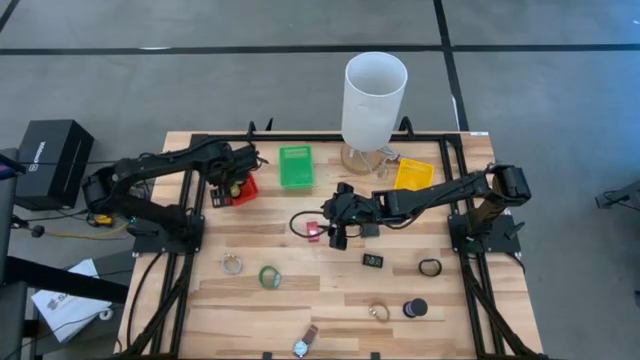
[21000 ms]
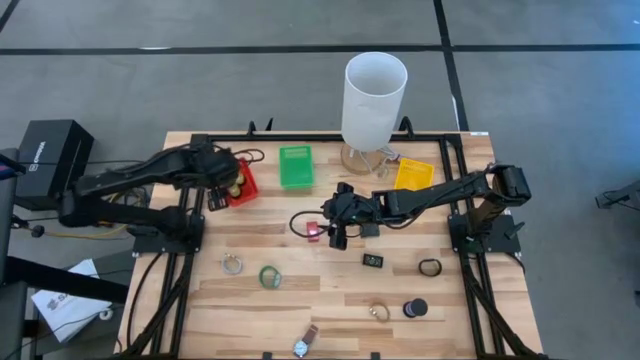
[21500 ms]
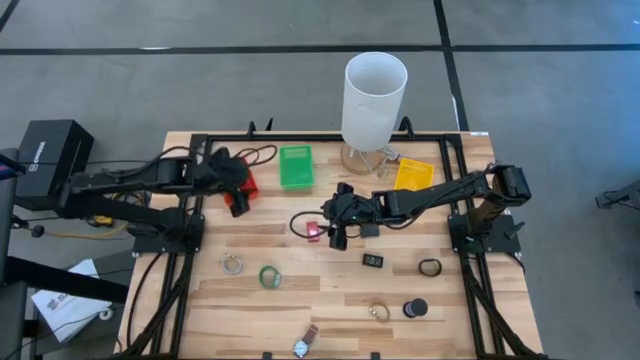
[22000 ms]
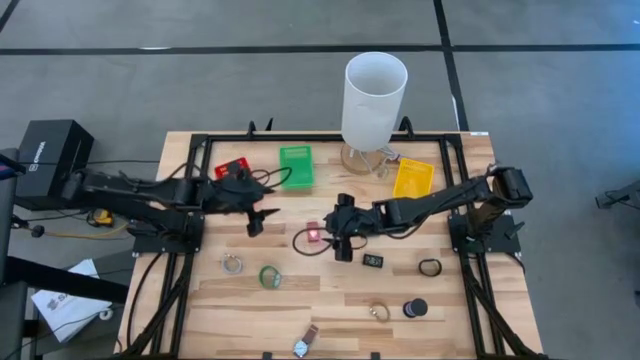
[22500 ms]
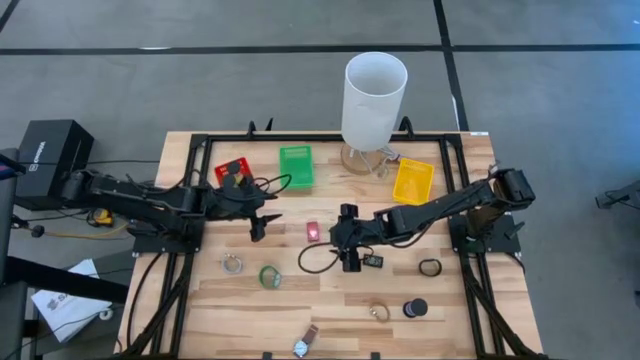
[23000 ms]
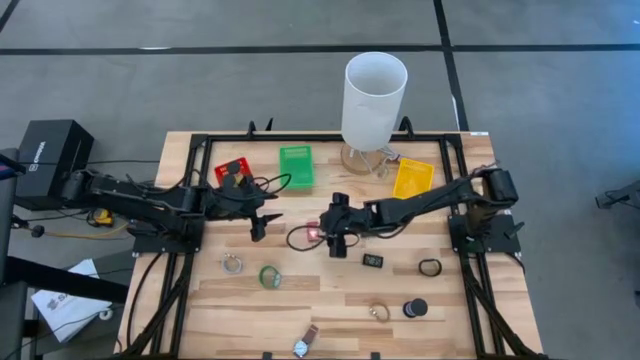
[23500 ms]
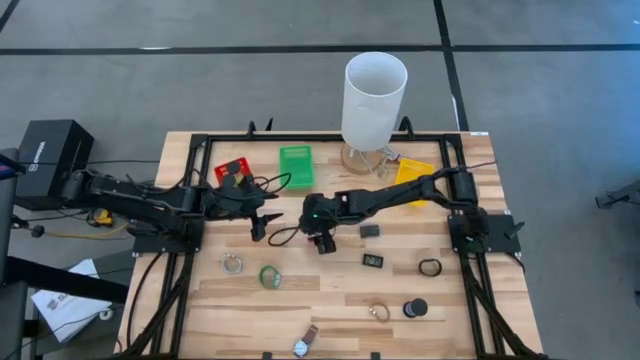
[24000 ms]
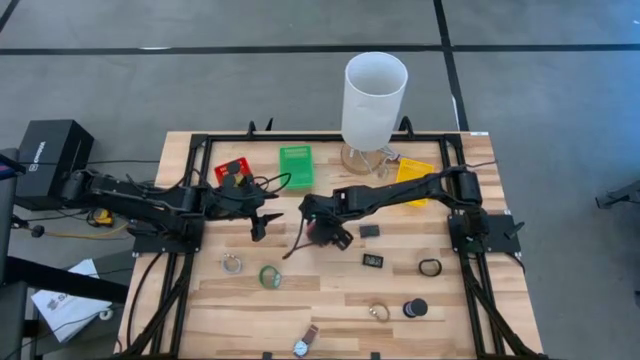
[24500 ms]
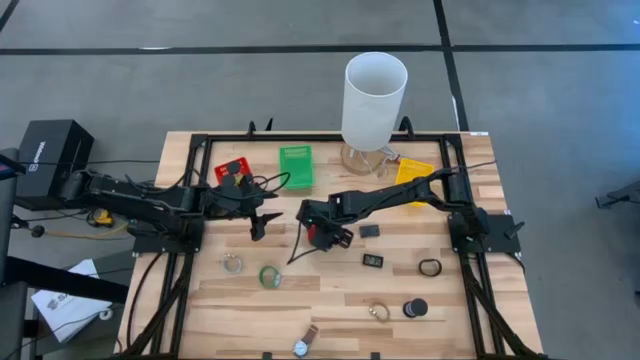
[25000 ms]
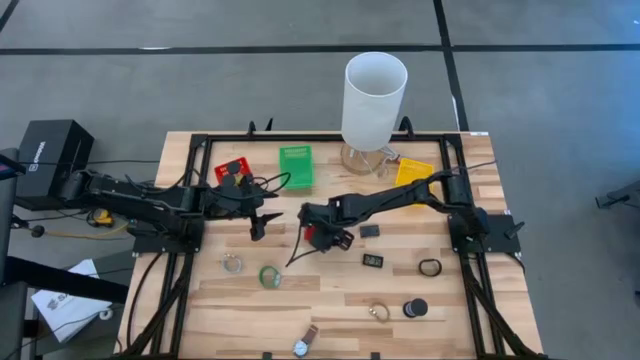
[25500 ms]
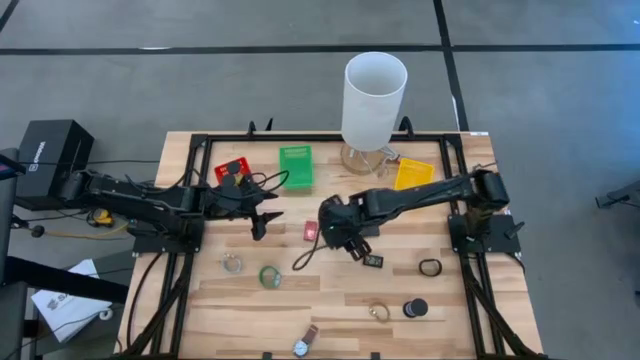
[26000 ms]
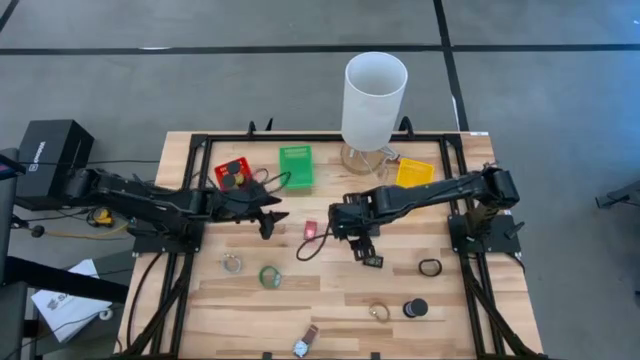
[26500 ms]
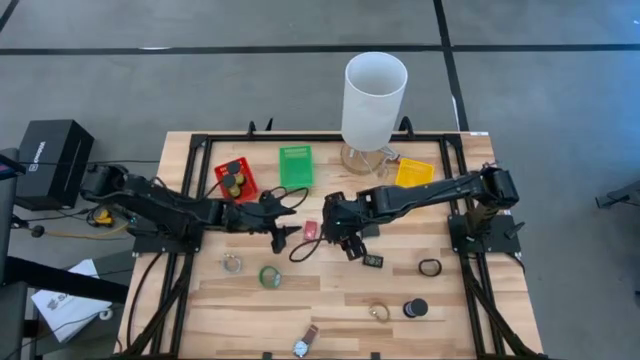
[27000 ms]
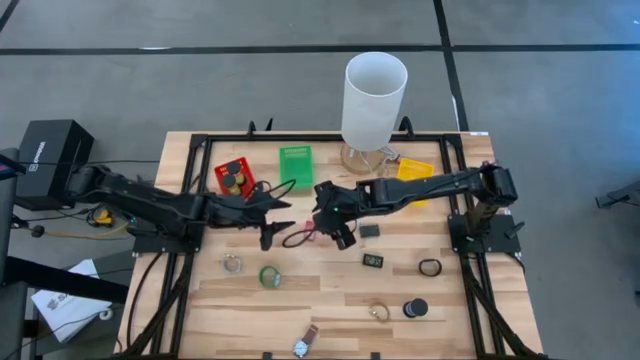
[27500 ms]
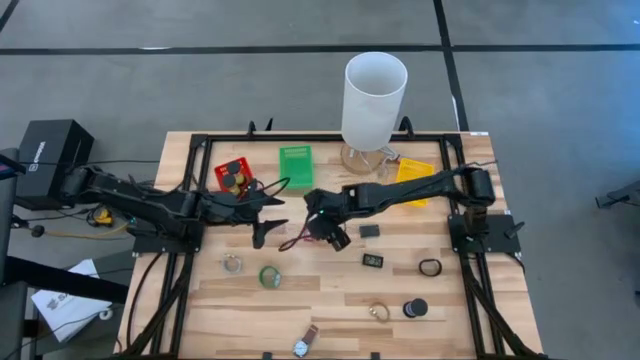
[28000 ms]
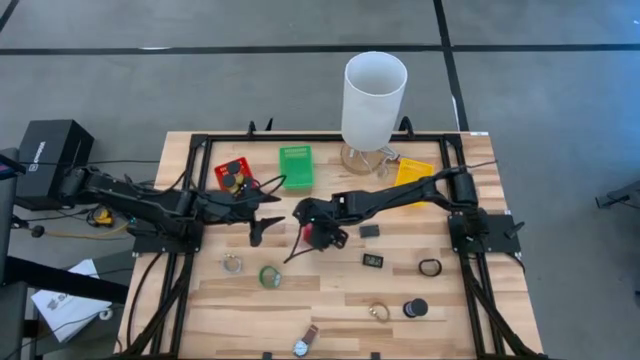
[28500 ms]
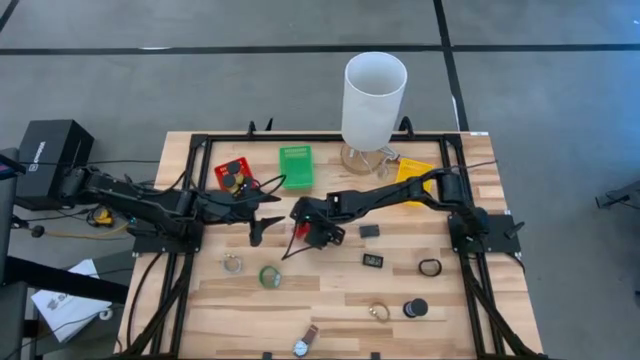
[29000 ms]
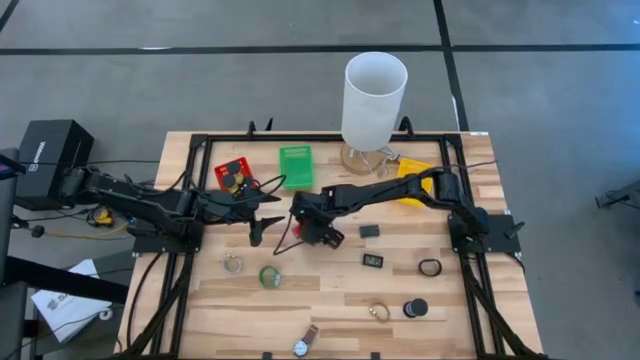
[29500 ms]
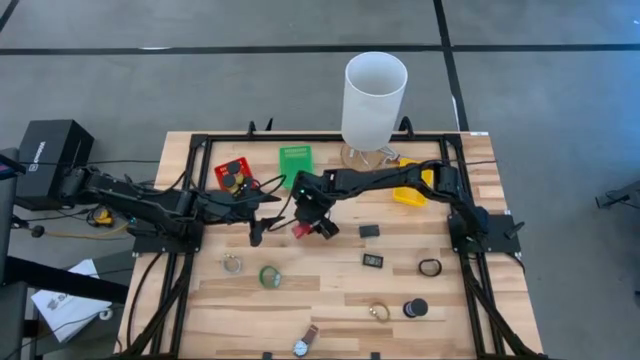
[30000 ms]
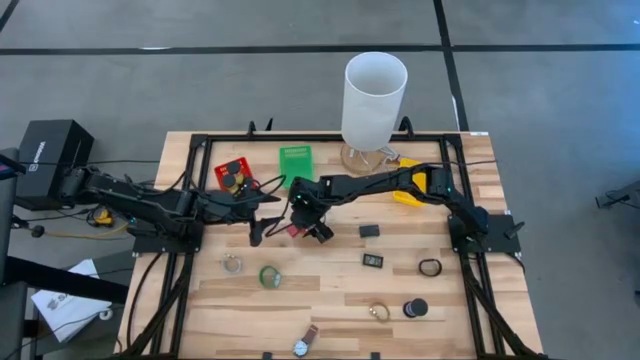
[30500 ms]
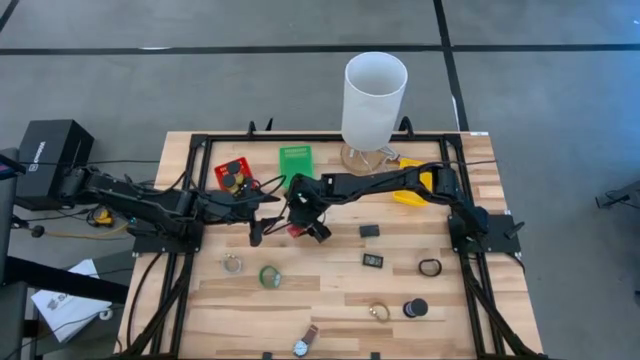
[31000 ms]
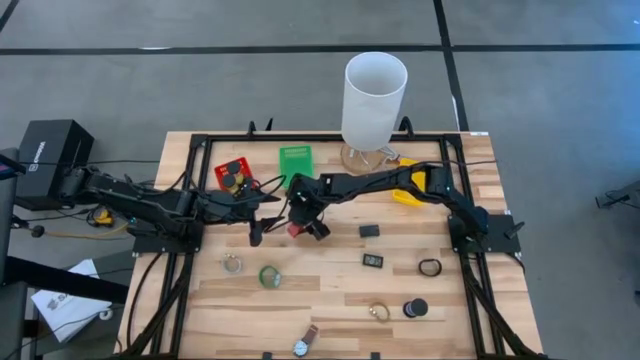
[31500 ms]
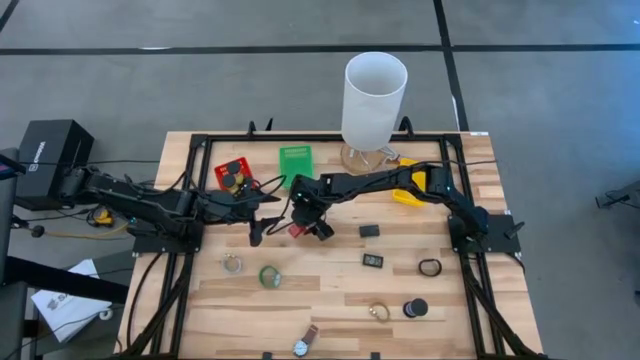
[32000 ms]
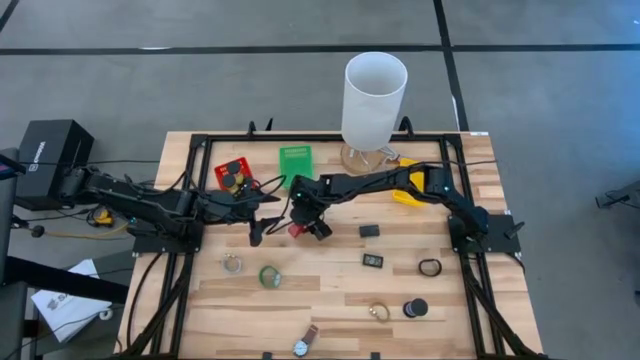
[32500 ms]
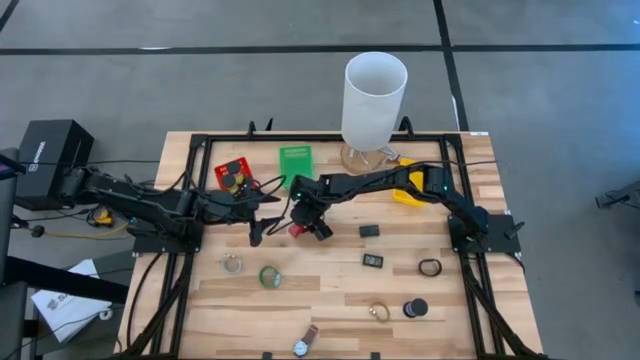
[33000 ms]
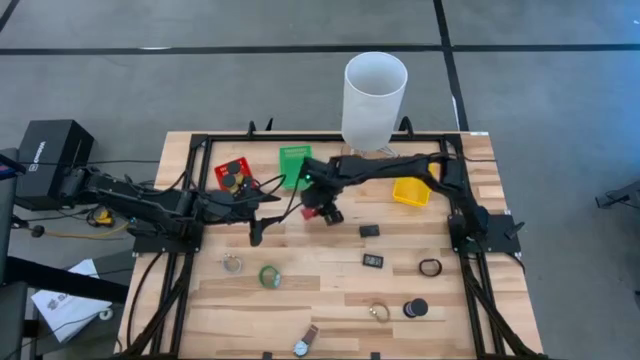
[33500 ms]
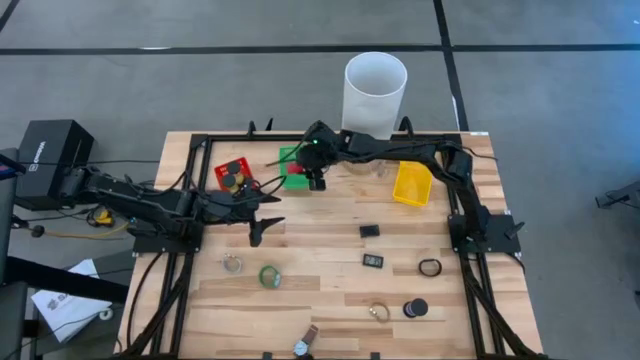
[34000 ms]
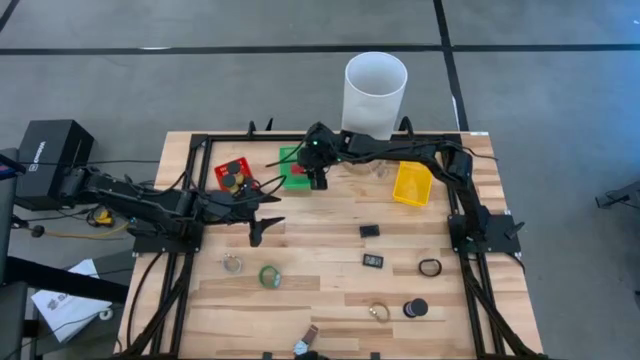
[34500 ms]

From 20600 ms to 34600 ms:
Task: Pick & Place Office items
Put the red digital clock into the green bin

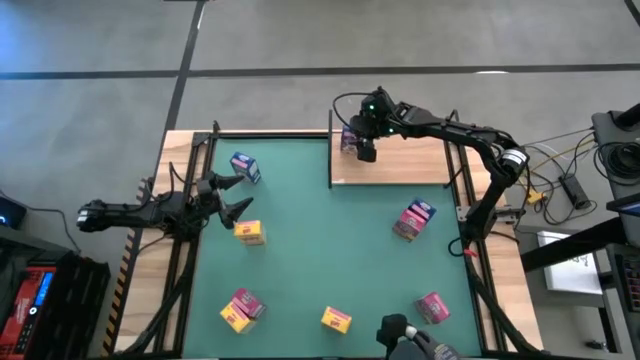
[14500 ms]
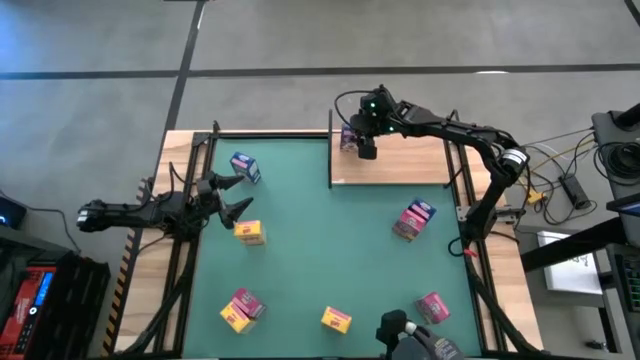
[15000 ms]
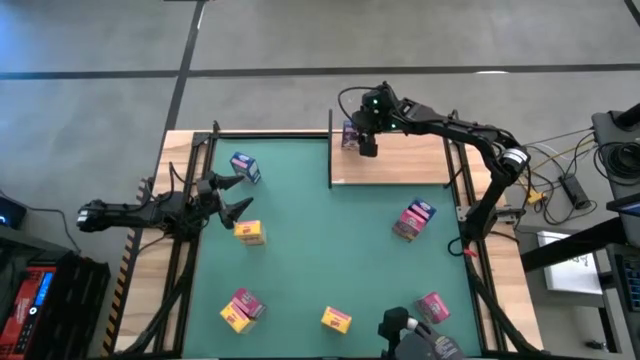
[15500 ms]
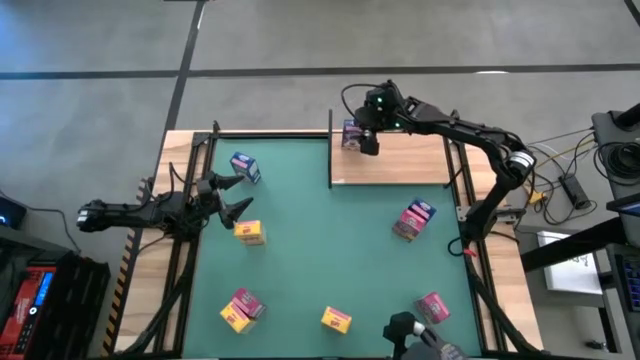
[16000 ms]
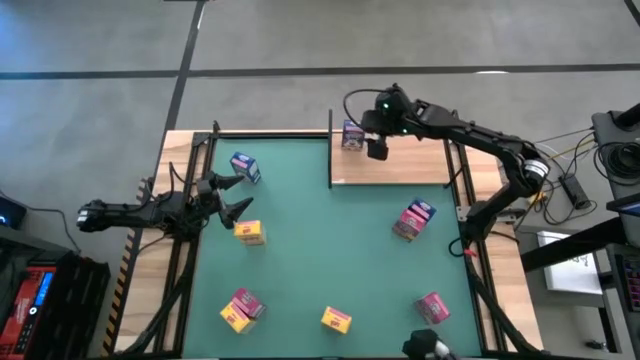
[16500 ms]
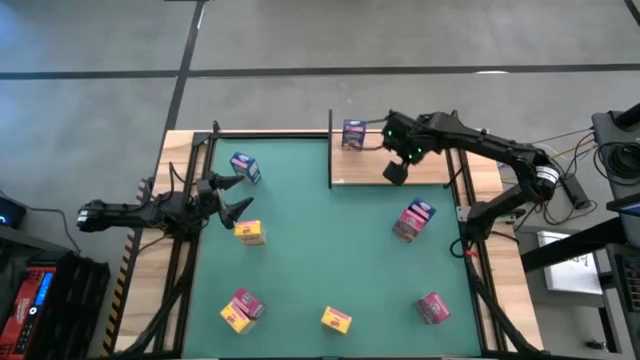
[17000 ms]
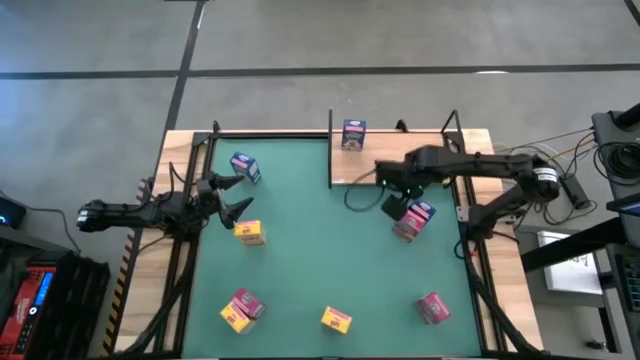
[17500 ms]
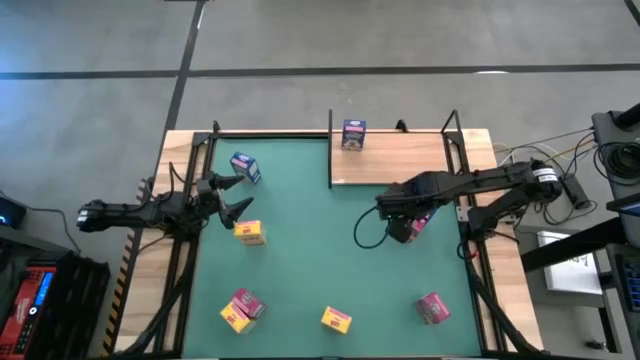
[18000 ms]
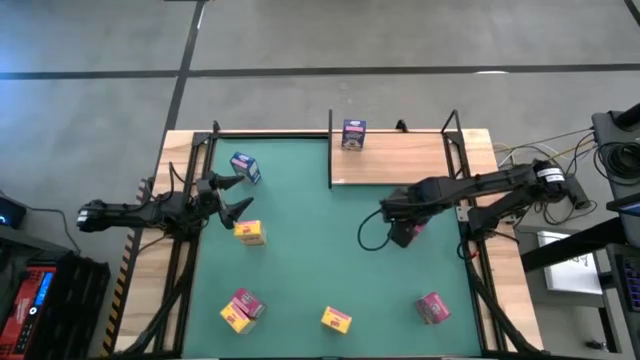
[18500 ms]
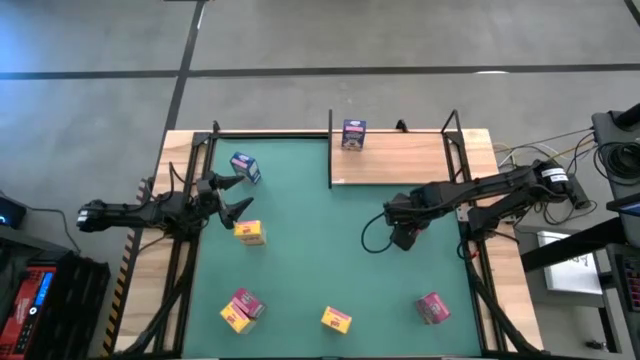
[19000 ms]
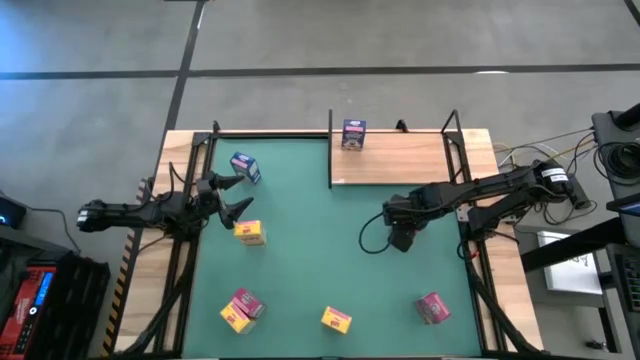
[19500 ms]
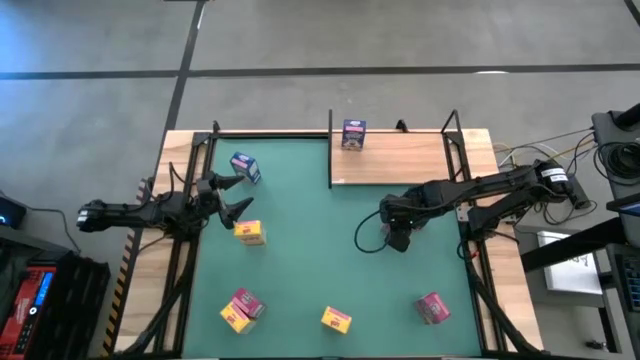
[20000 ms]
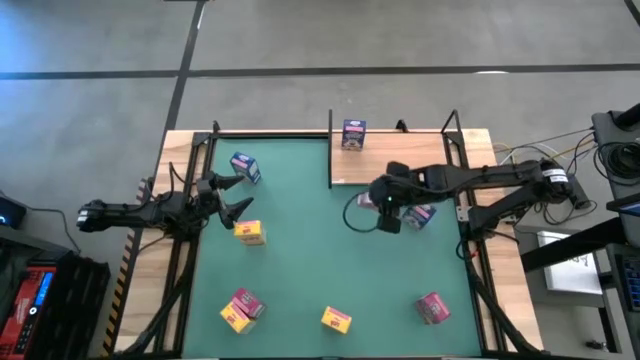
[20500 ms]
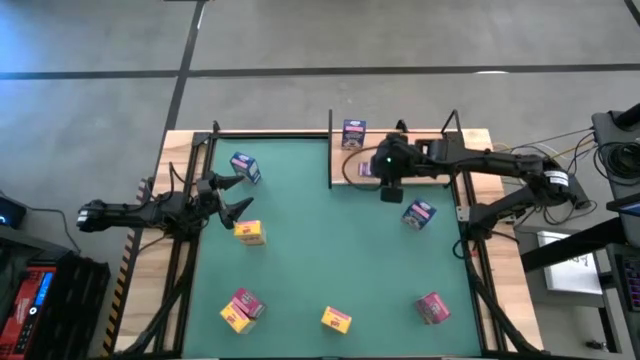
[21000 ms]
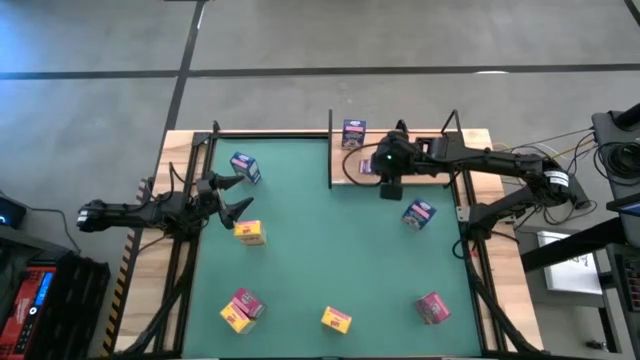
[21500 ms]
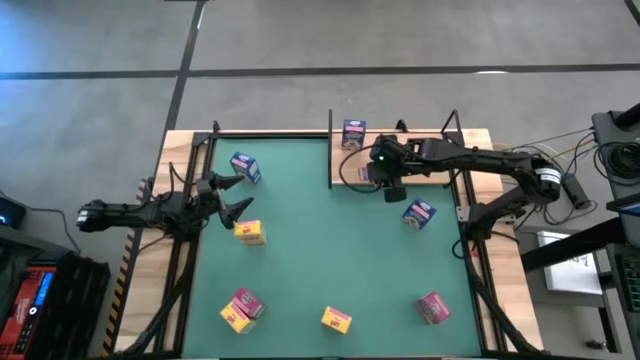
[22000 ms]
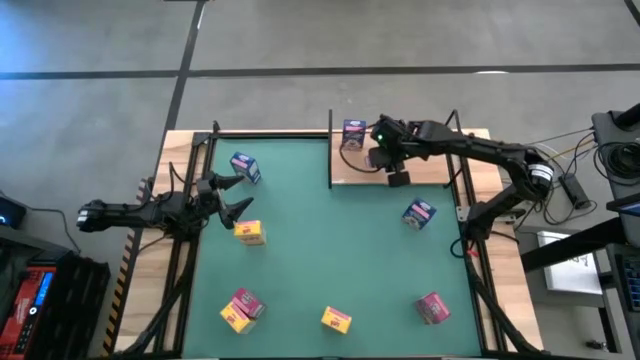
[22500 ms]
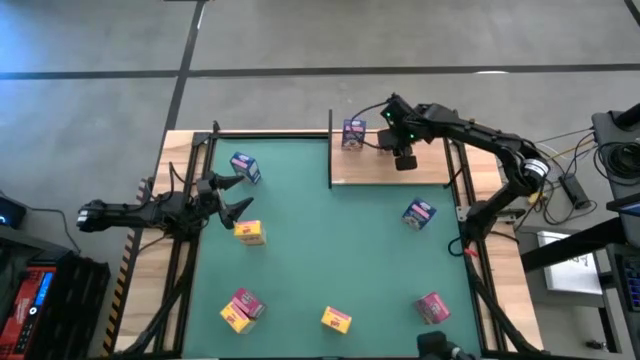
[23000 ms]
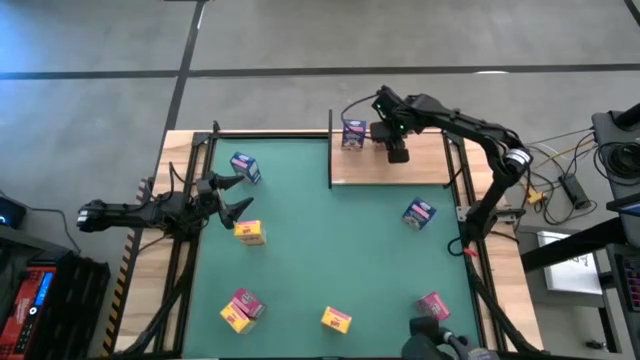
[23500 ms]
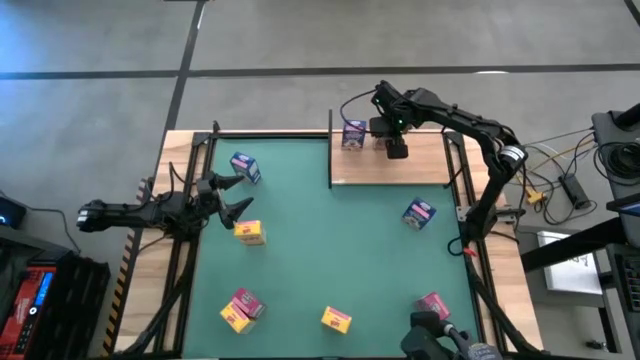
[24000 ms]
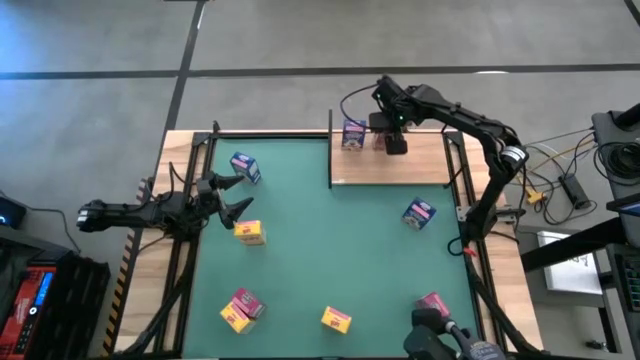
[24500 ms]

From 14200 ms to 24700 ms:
Task: Stack cereal on shelf
Put the middle right pink cereal box on the shelf
